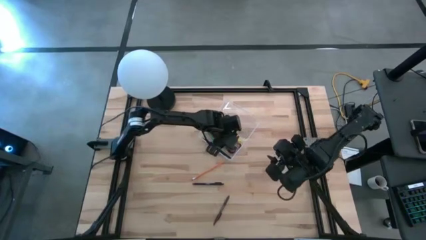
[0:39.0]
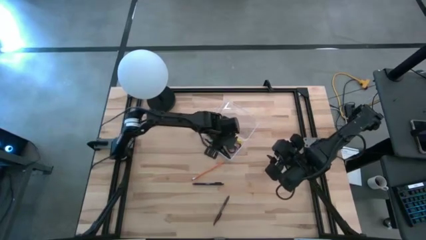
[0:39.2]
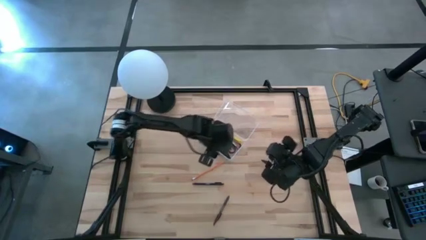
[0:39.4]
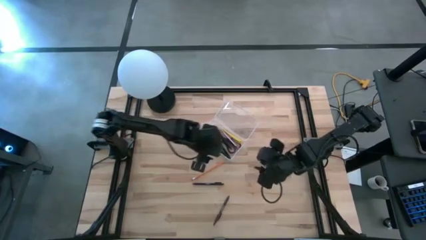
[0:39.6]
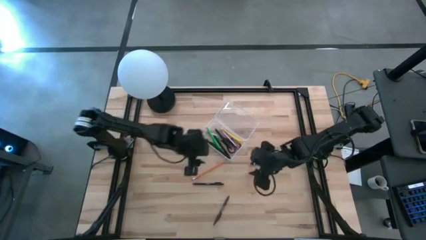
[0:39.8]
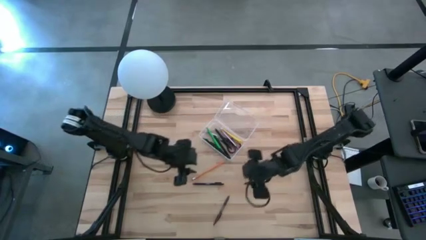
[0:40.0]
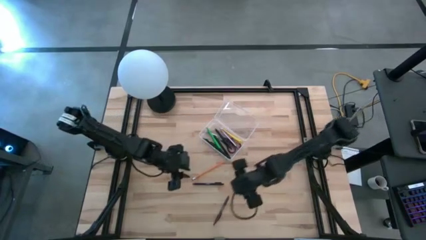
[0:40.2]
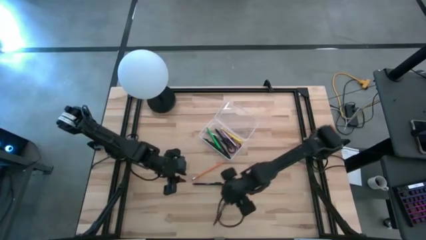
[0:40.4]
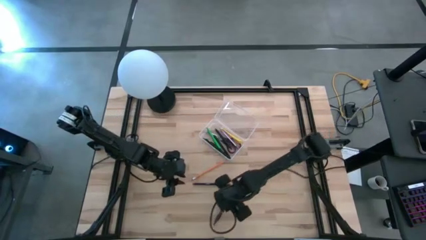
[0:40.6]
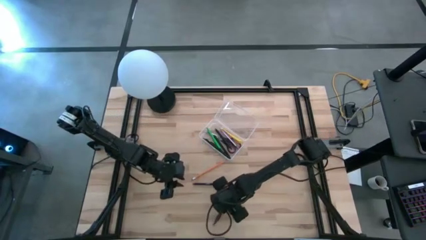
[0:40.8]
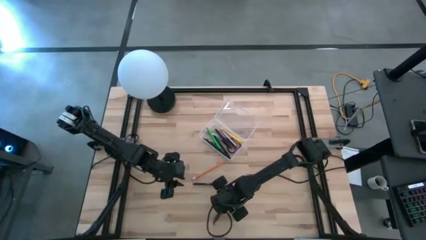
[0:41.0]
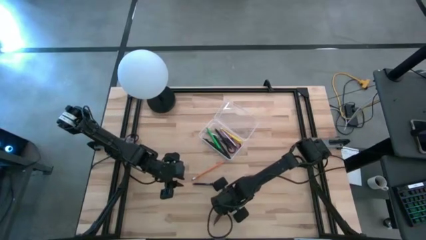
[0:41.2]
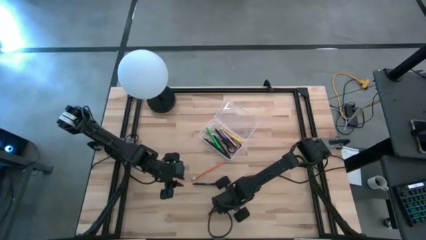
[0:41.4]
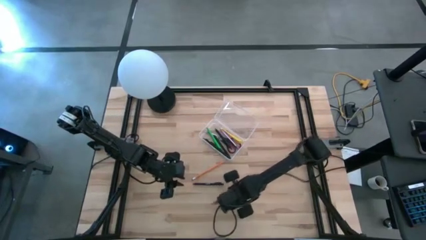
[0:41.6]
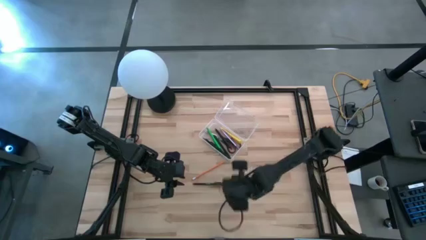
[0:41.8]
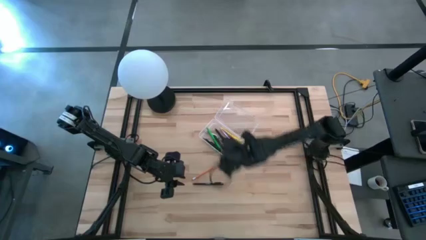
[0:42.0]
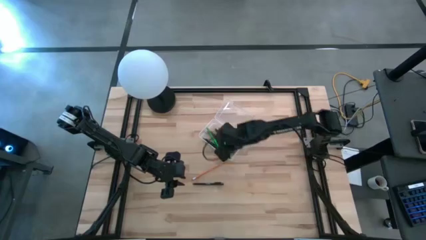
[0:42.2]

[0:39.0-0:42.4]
Task: Pick & place school supplies into a supply box
Put the brown pen into the transparent supply box

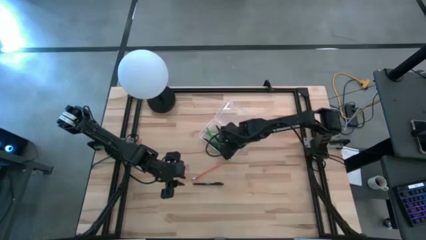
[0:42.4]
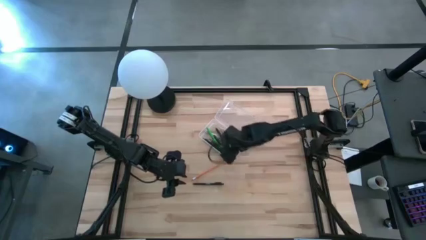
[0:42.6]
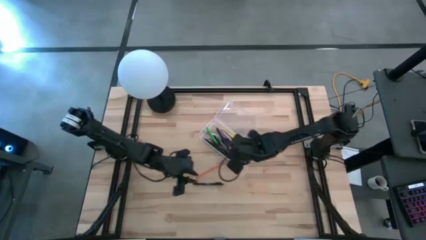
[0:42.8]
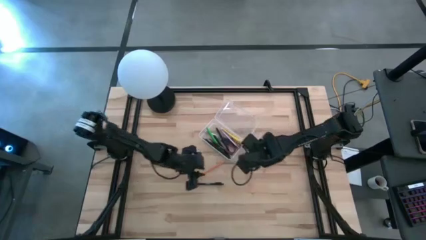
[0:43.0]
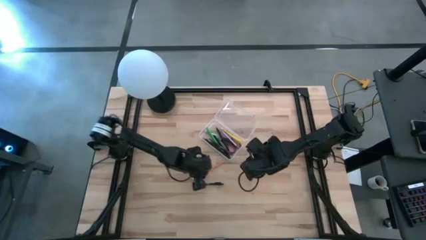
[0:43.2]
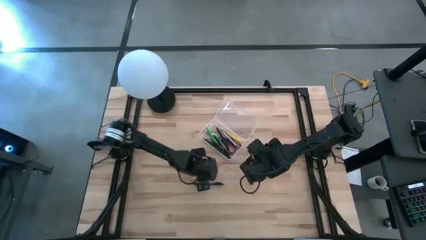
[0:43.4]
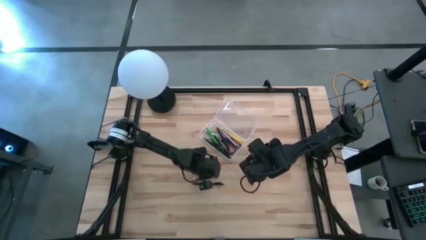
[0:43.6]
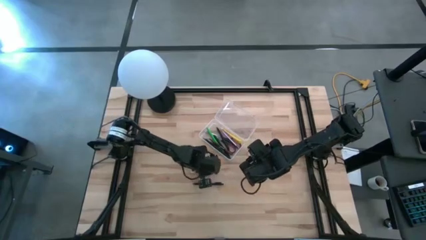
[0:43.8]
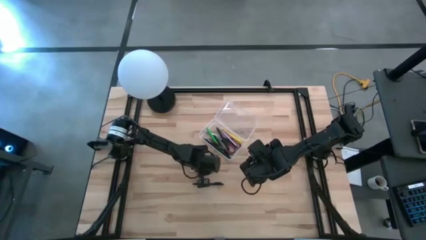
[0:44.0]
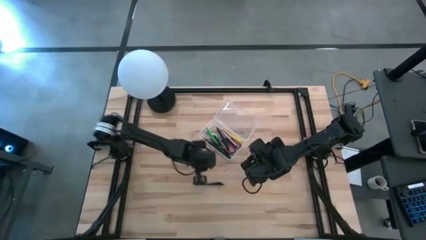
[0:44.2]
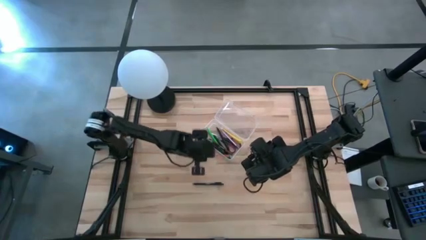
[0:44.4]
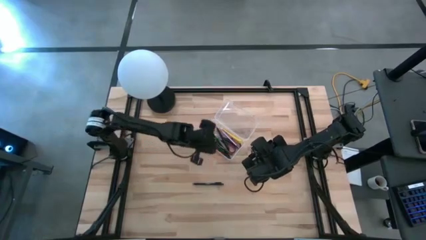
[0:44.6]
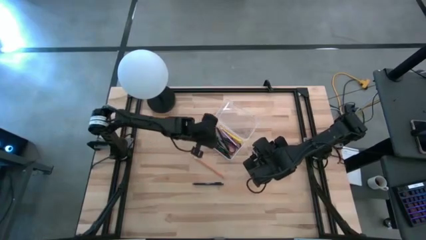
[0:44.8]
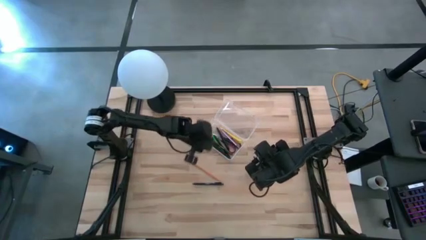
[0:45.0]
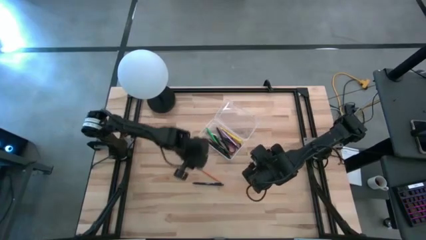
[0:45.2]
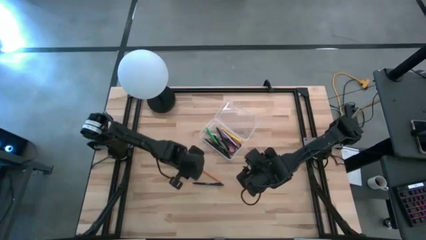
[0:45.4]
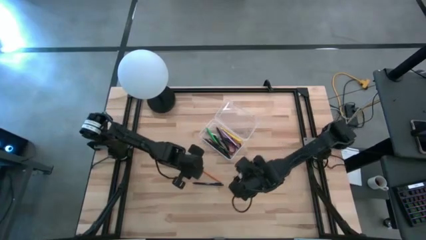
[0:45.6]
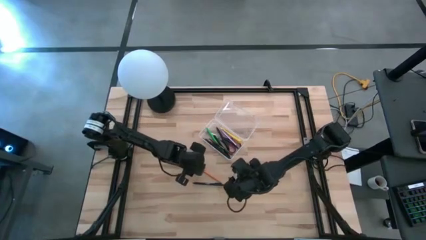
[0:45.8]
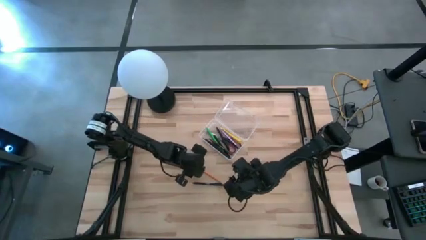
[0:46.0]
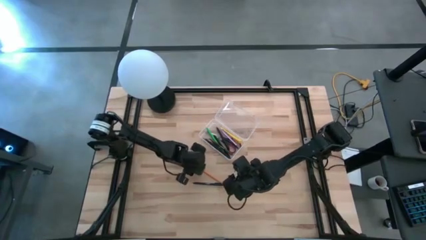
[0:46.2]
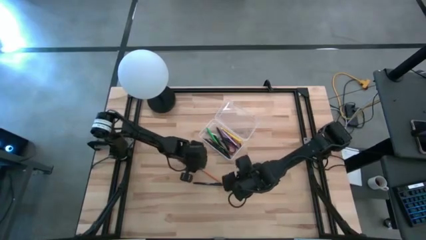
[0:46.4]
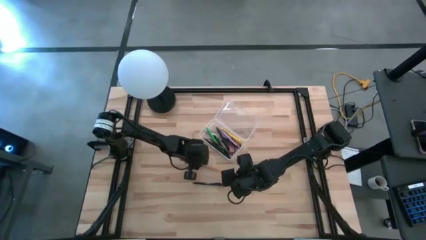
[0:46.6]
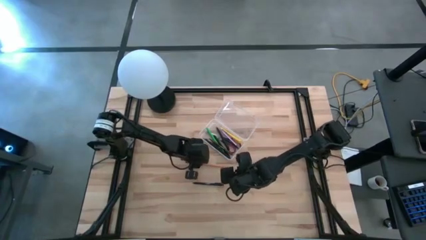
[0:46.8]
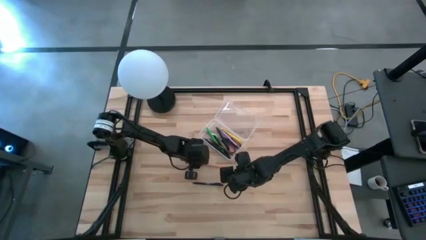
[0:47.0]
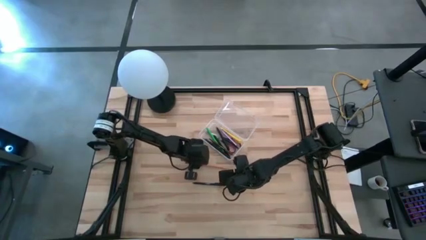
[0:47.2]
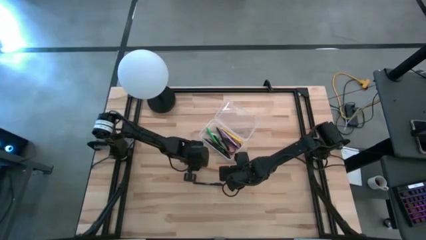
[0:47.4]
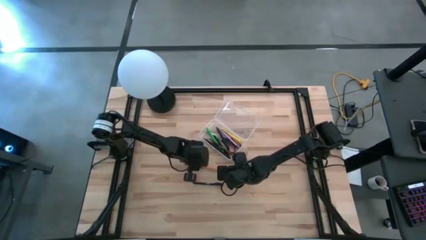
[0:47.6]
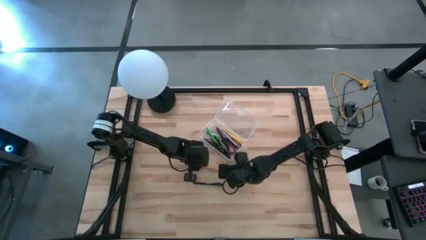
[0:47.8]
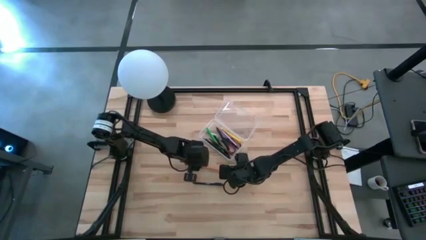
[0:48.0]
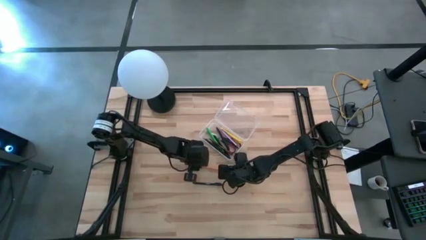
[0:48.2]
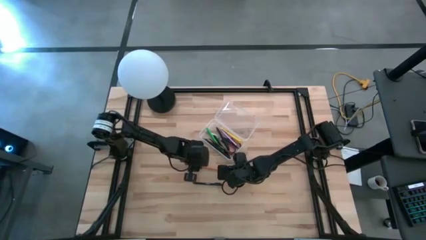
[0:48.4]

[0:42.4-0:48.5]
Put the yellow pencil into the transparent supply box

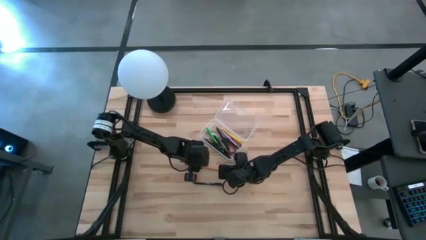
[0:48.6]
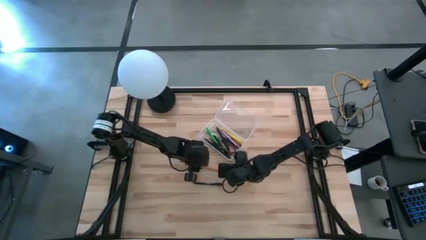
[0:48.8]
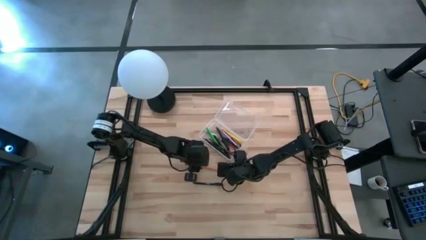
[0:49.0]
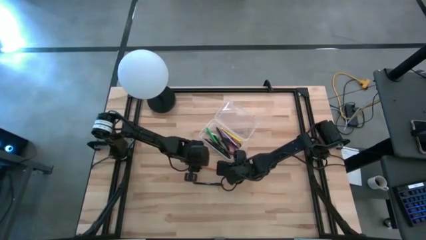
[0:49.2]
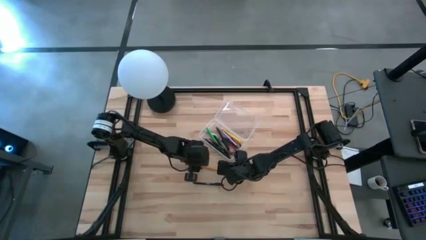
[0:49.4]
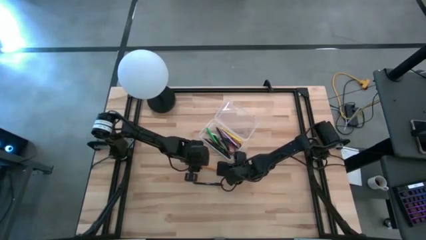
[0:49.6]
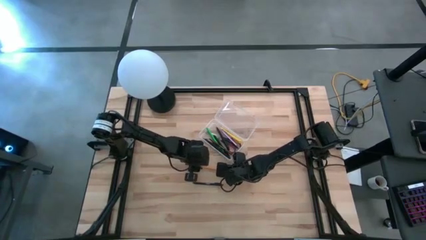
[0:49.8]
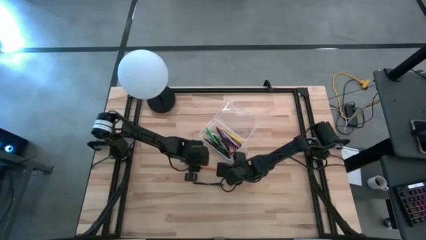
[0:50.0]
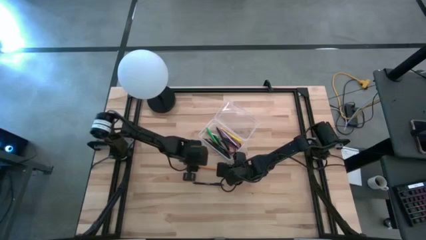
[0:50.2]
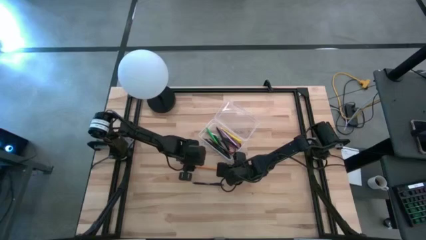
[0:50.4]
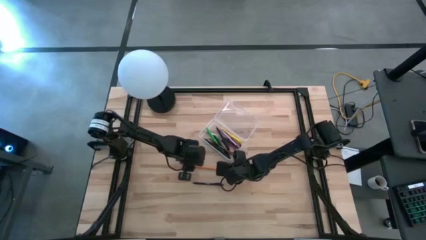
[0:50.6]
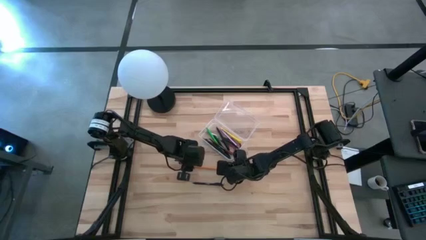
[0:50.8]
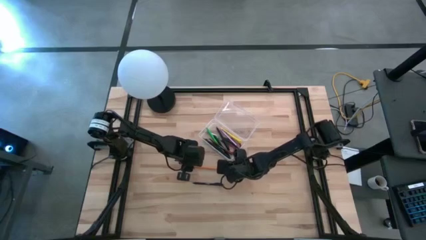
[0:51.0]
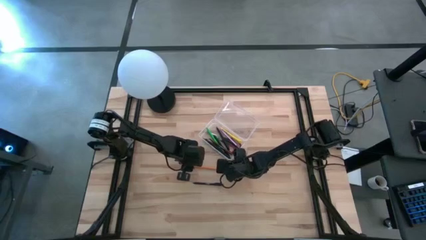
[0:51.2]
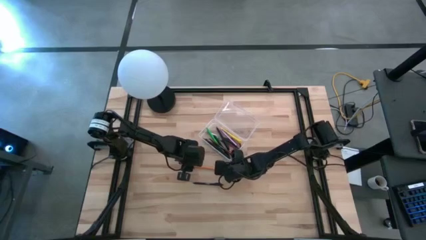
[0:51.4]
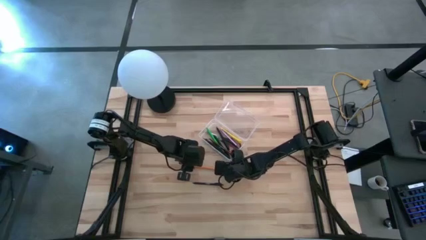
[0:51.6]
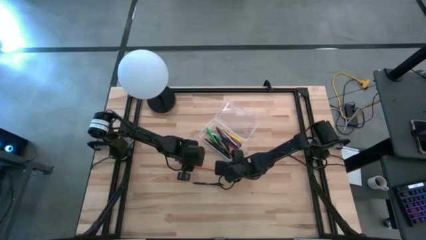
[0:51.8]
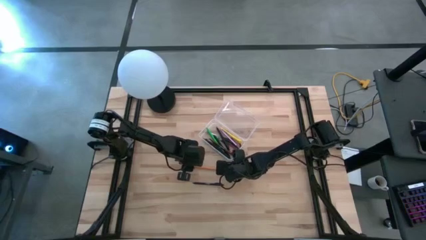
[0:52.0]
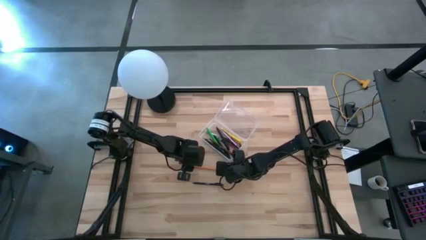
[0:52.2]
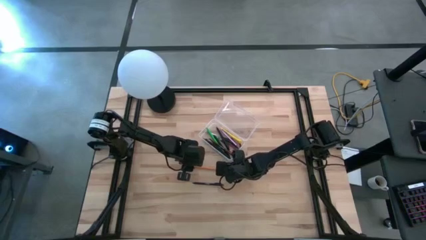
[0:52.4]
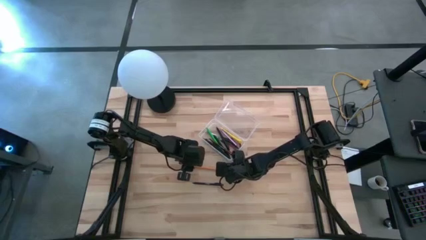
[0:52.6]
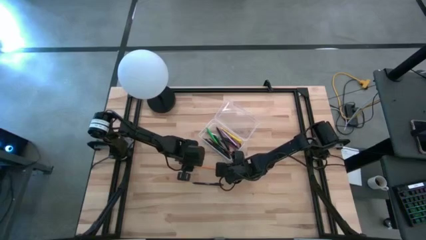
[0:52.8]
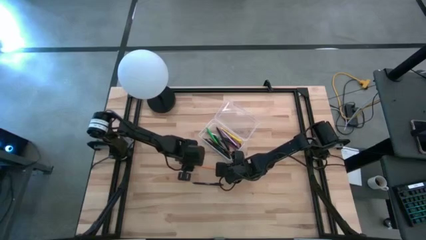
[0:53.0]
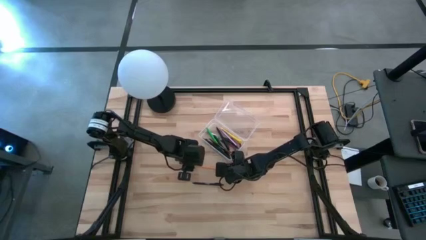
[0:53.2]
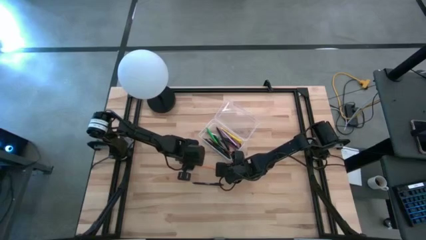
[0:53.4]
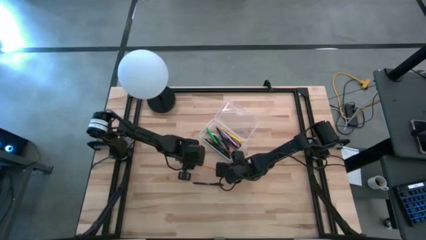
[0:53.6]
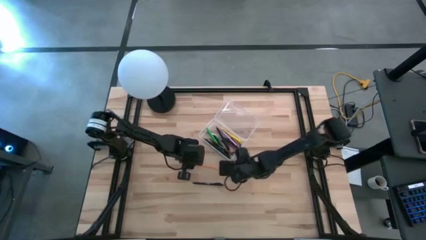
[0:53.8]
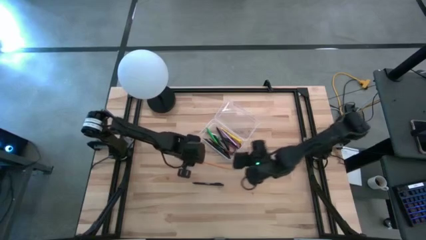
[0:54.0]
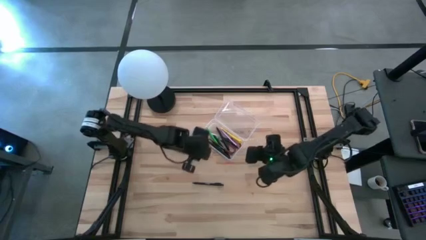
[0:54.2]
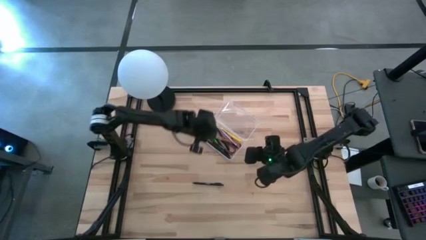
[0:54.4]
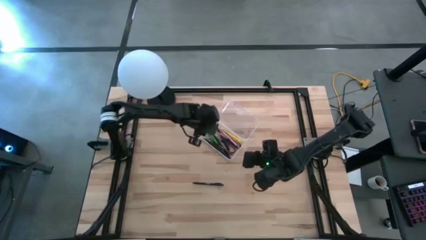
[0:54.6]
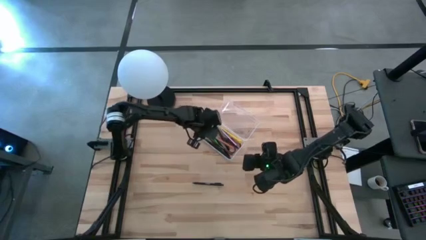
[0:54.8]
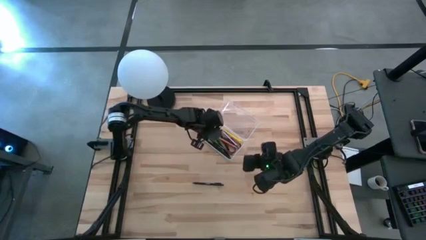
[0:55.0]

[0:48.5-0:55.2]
Put the yellow pencil into the transparent supply box

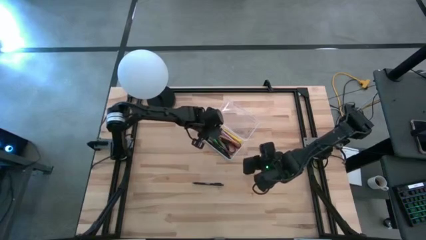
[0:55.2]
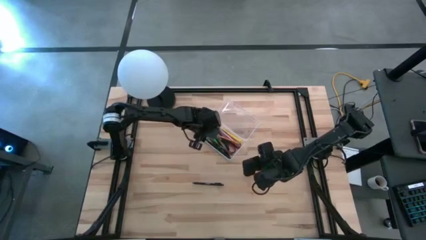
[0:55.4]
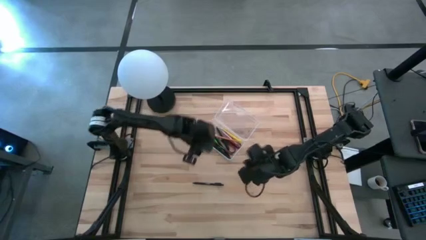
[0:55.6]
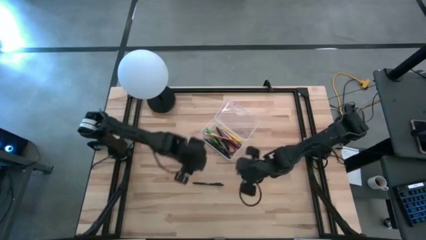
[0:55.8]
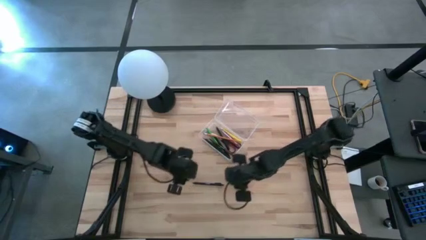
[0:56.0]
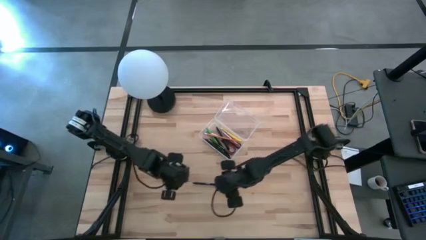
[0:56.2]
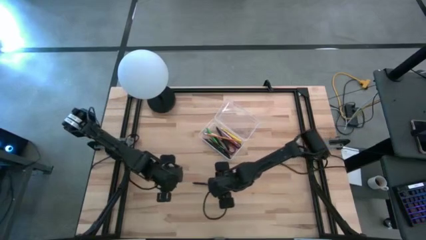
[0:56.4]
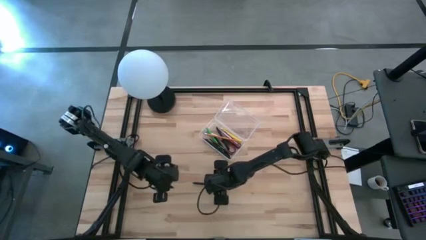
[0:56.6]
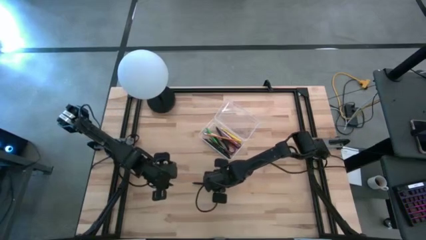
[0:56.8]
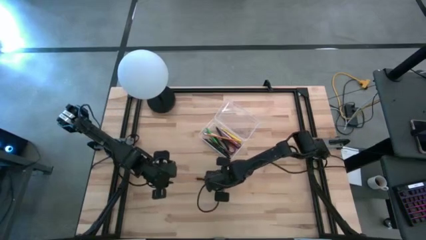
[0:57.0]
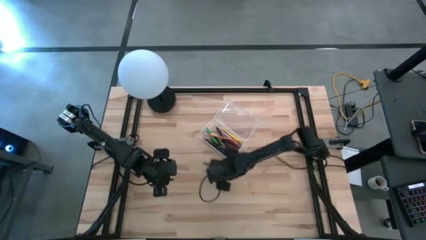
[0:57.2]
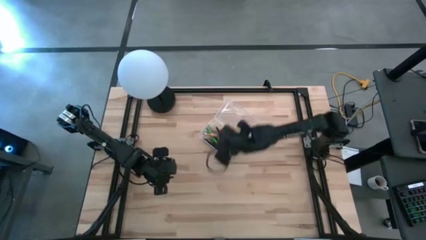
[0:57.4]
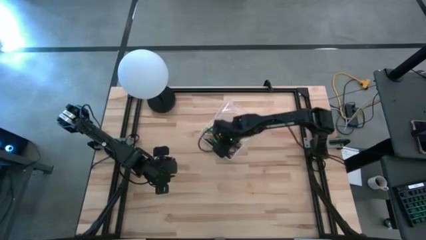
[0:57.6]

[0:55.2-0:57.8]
Put the black pen into the transparent supply box
